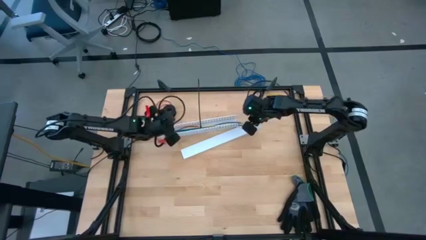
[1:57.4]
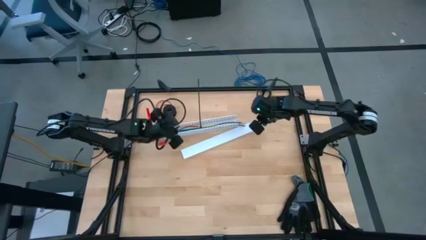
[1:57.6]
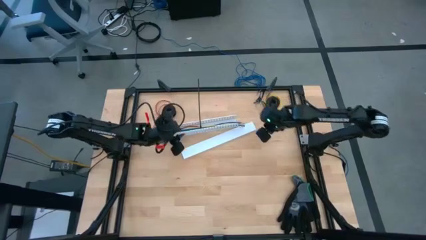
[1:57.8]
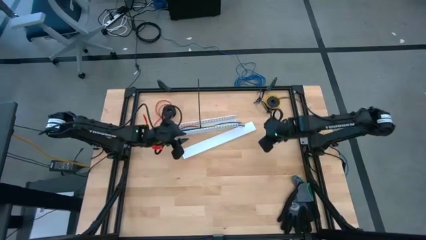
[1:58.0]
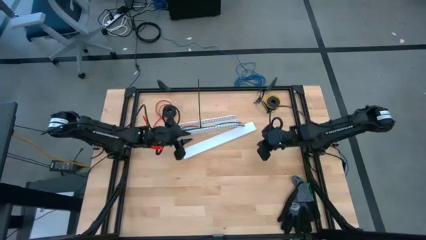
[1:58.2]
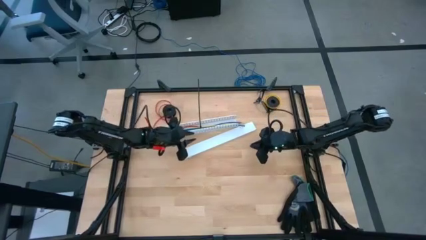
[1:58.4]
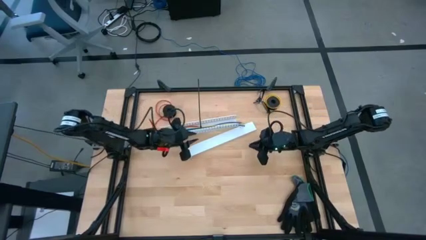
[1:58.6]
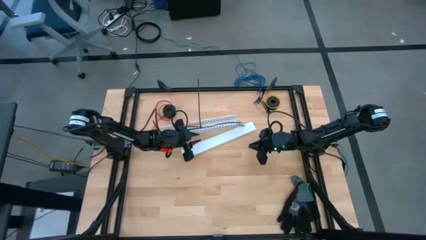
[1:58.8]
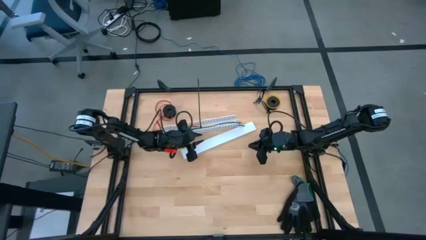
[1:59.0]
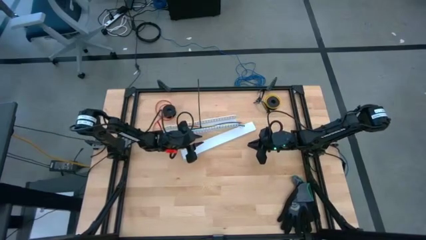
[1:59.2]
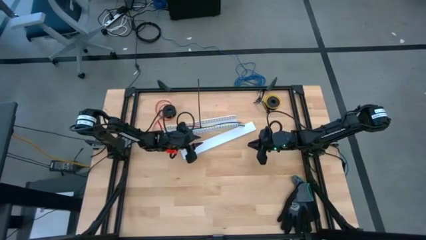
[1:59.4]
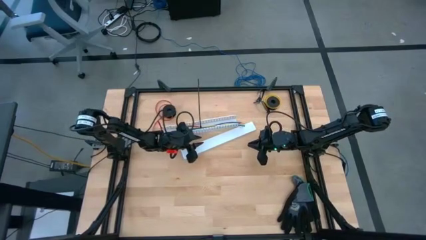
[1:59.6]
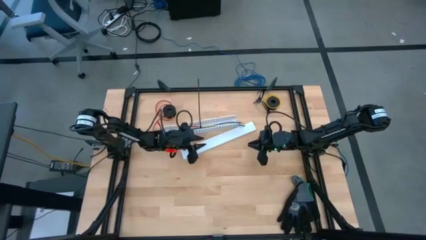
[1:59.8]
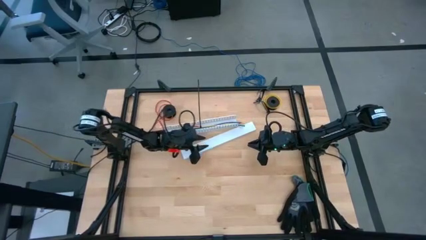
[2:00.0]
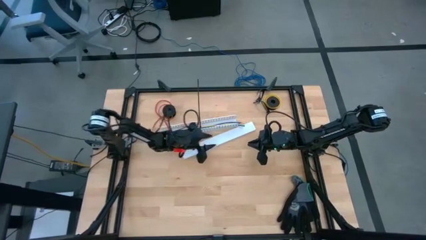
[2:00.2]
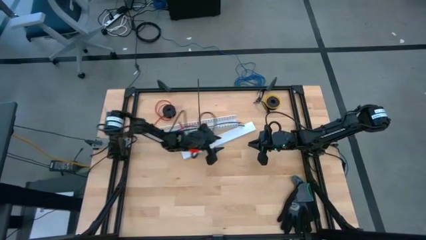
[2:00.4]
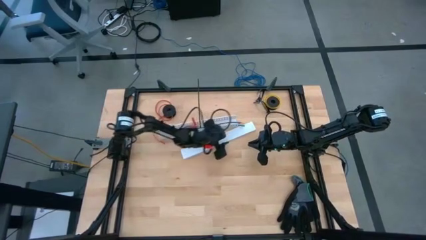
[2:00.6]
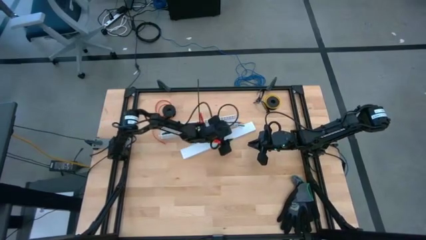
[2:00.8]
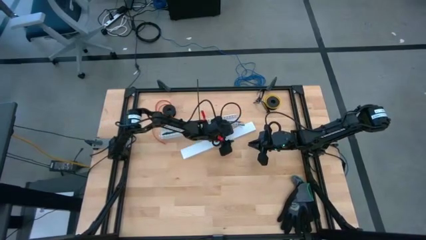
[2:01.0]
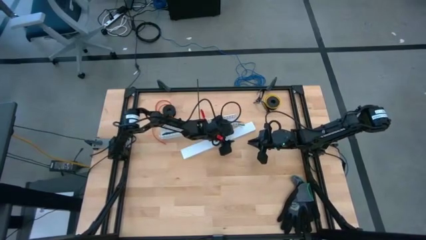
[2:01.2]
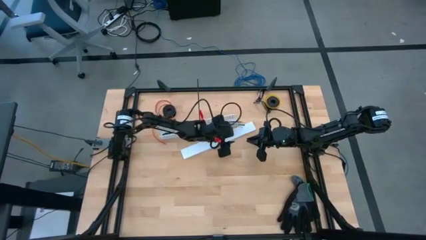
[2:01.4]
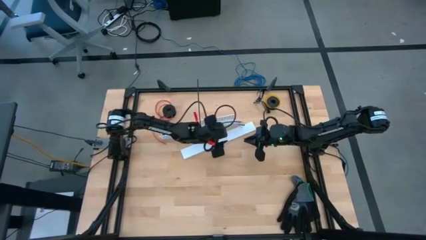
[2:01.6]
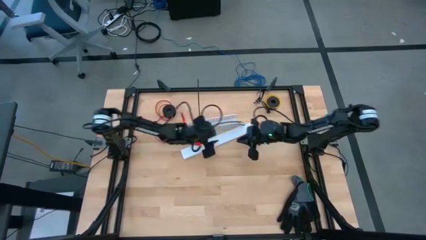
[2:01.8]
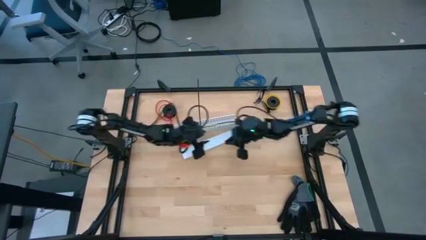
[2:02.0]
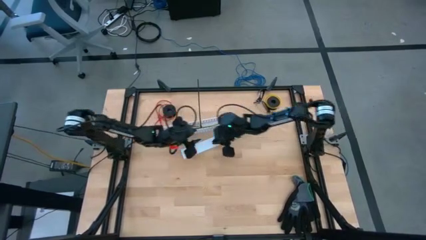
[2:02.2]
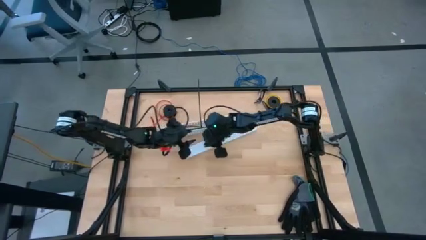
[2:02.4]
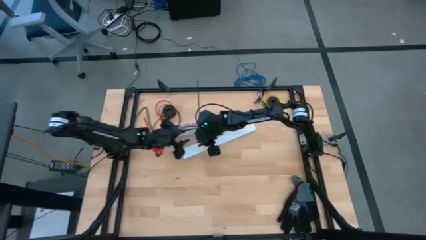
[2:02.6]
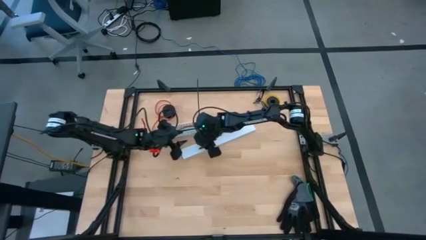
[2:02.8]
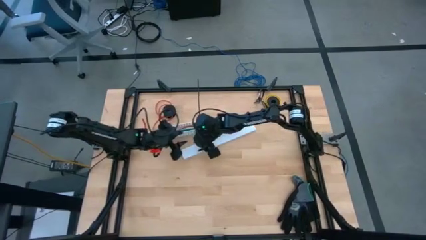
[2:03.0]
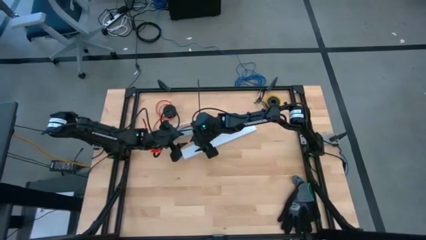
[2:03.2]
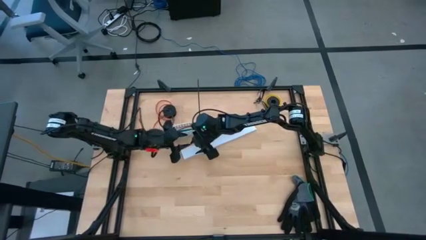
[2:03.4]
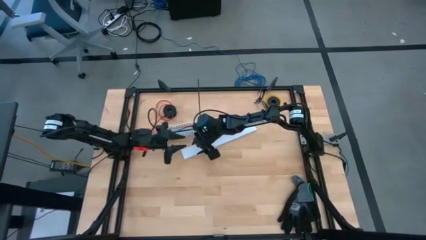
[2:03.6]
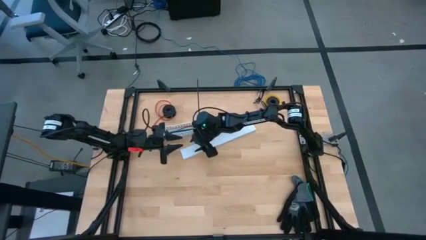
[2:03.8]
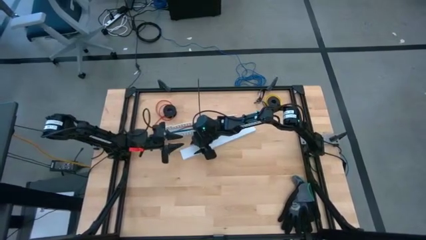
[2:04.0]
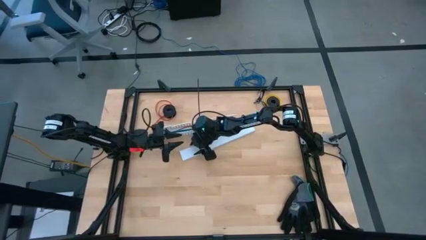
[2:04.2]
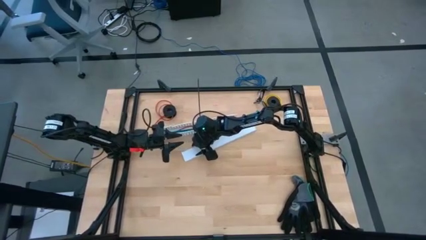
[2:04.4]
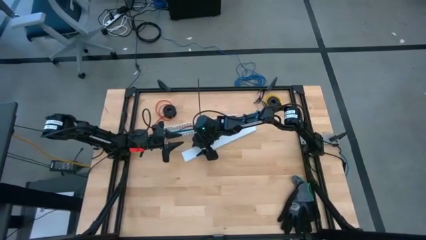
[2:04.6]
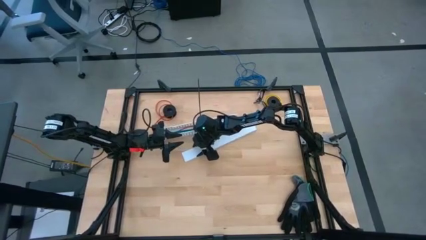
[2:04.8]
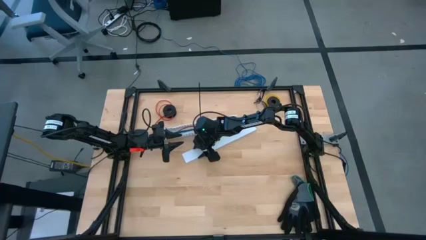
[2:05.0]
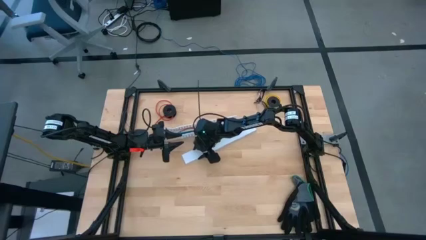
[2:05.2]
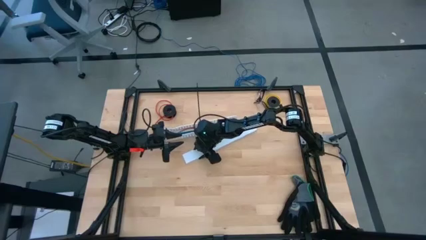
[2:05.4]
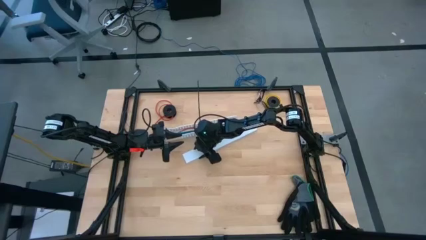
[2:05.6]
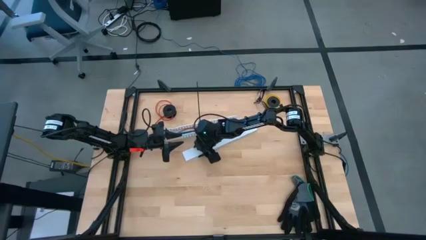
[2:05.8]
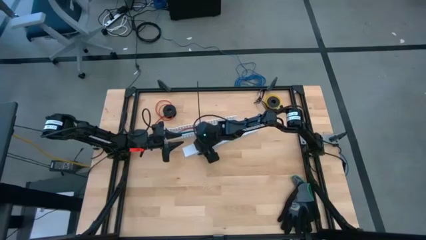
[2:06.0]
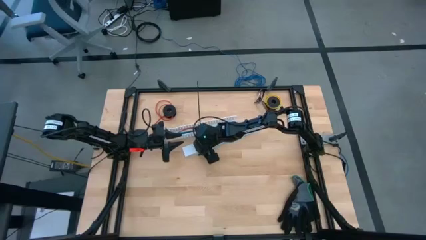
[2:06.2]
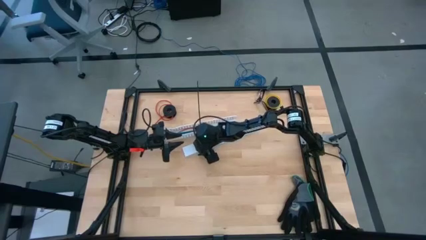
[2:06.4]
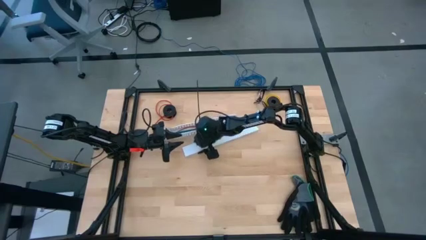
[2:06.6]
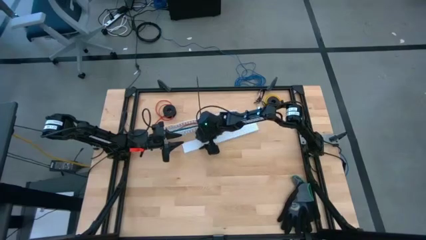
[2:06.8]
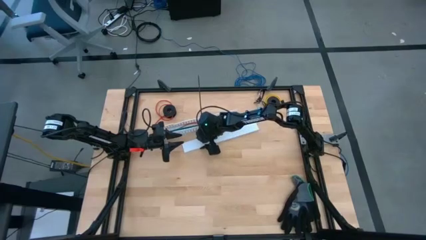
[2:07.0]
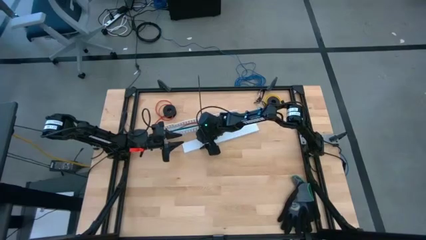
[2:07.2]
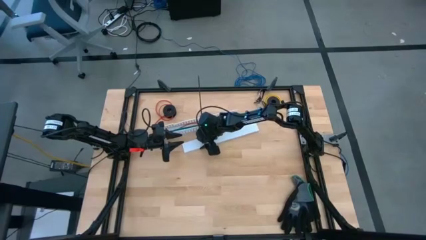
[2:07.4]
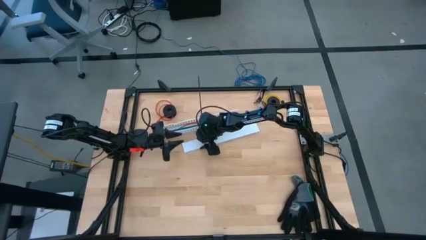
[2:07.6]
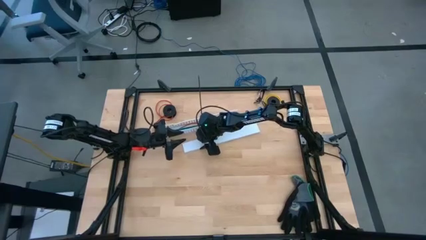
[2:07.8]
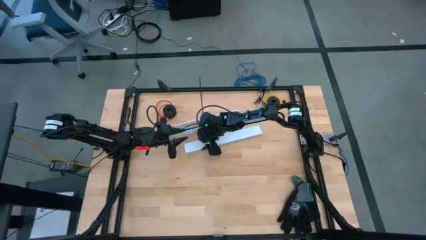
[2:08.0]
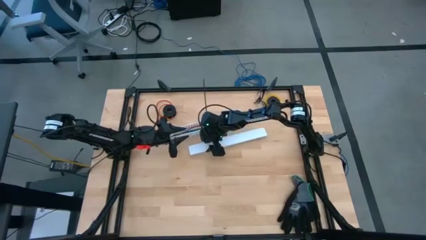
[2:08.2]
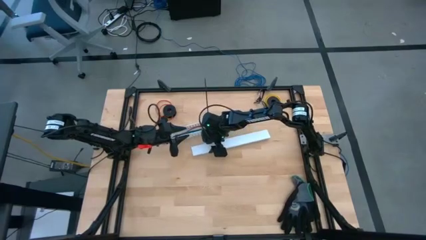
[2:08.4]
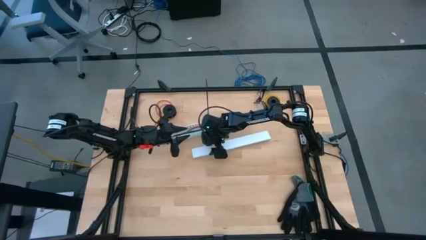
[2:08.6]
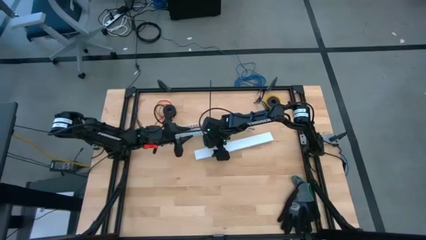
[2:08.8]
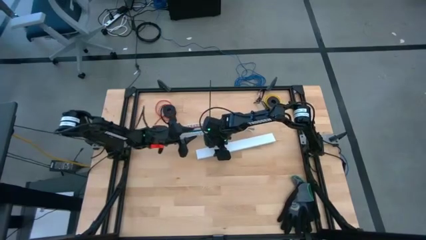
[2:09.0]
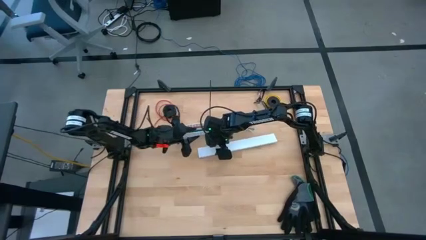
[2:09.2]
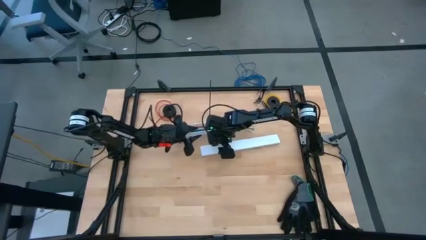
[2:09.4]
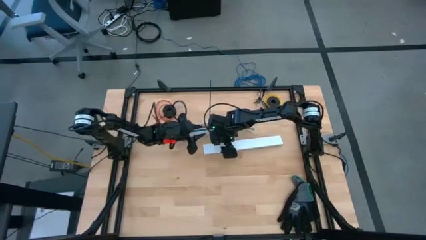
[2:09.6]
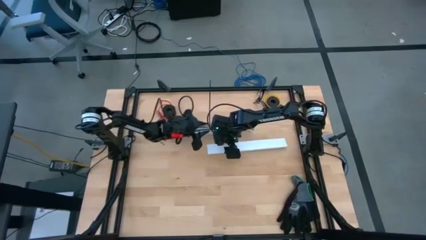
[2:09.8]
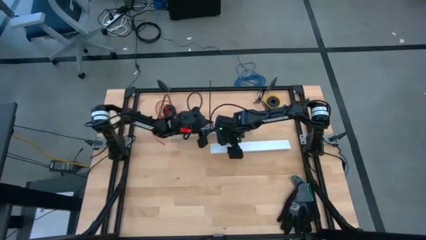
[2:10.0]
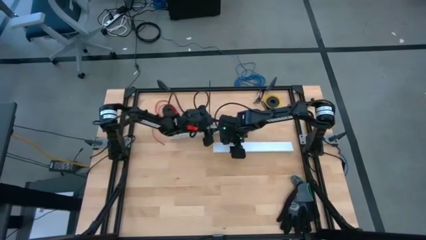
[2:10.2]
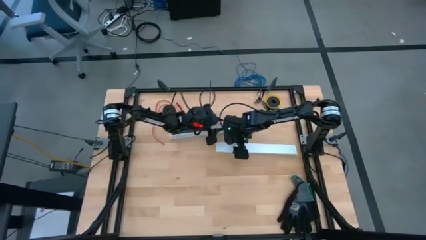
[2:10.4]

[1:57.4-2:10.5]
Task: Ziptie cables
Close the white cable duct

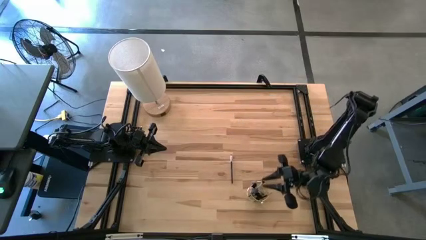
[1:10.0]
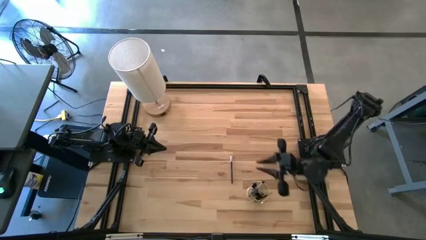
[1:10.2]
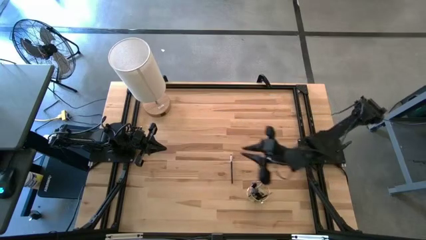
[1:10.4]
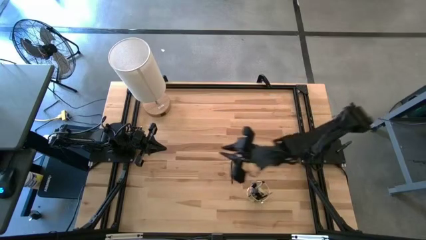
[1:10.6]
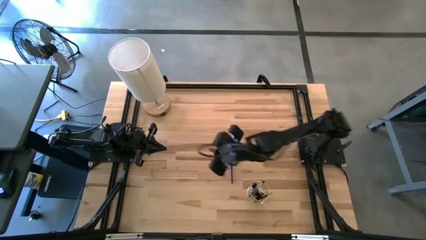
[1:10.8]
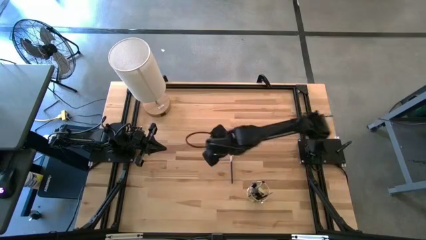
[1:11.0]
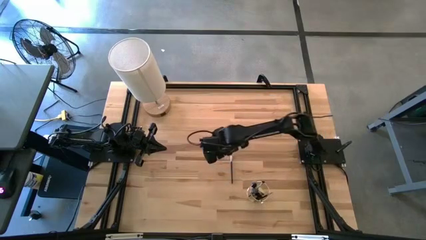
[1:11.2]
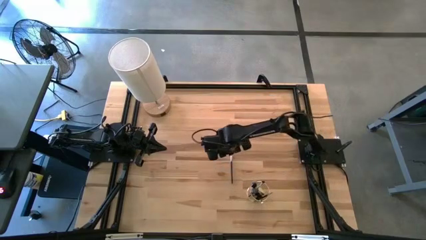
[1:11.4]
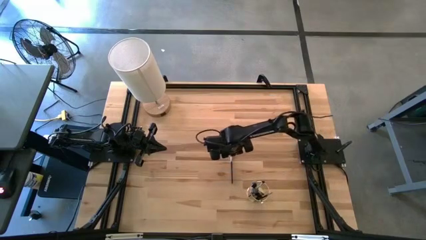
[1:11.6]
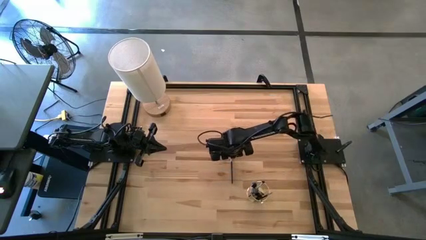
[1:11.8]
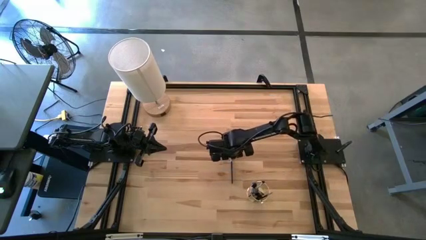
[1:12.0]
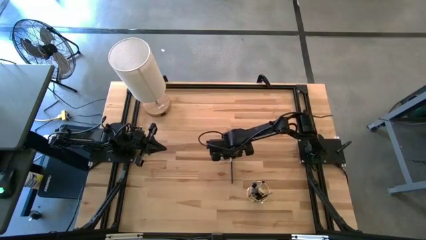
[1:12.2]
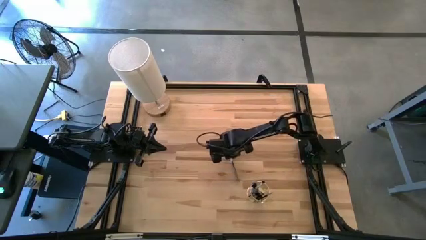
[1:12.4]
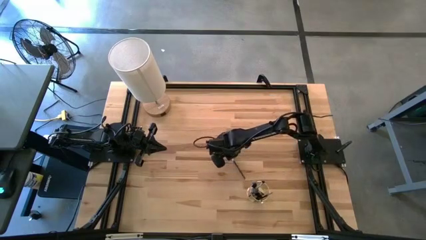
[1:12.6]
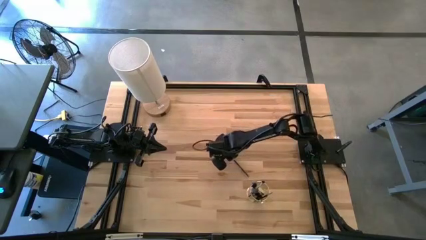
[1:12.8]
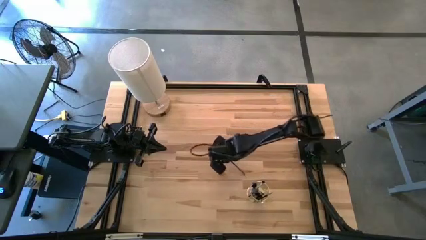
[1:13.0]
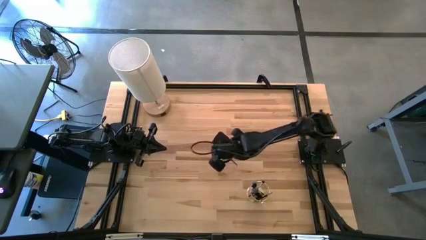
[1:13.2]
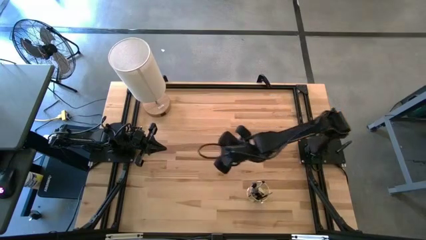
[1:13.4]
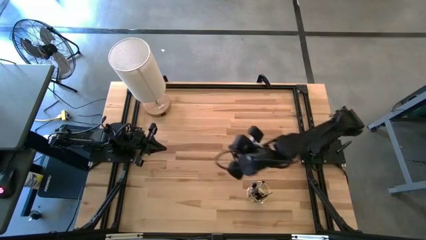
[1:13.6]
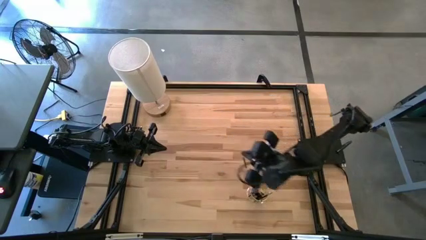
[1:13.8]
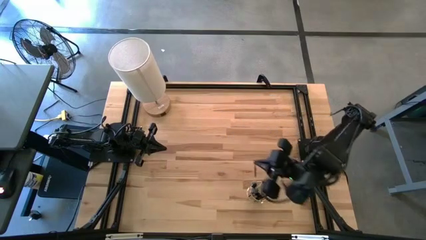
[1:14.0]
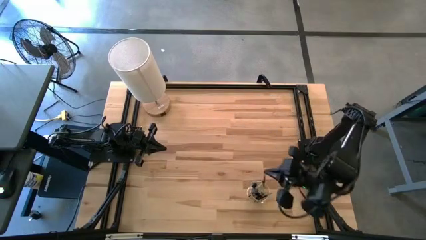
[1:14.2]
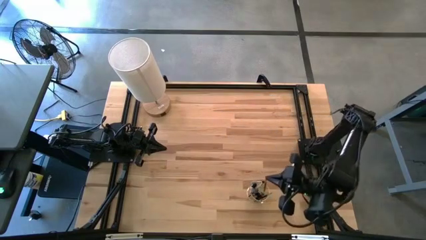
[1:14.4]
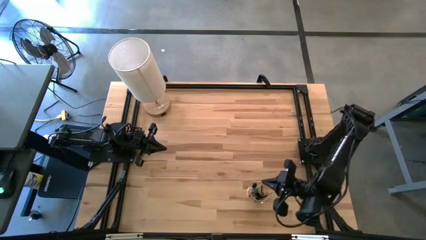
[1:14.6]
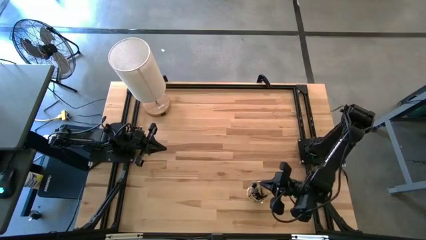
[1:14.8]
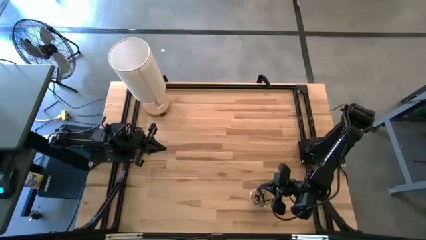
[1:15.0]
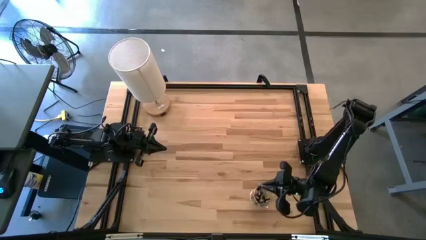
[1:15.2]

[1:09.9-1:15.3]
Task: Pick & Place Makeup Brushes
Put the eyeshadow brush into the makeup holder
